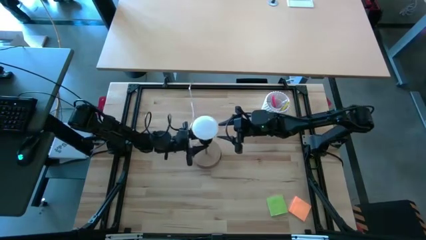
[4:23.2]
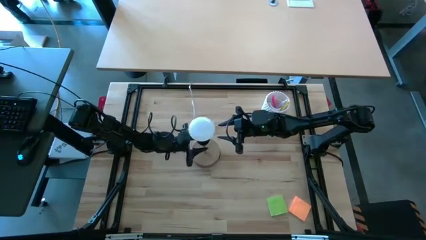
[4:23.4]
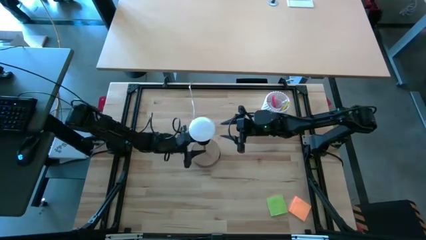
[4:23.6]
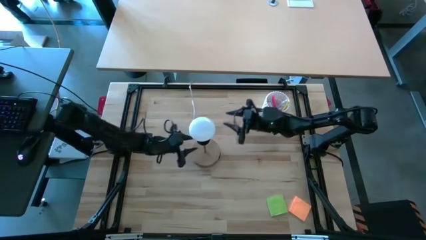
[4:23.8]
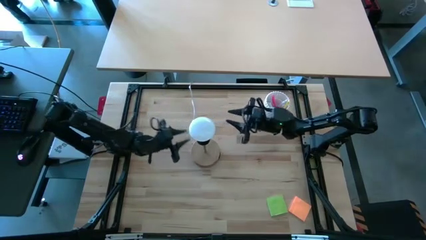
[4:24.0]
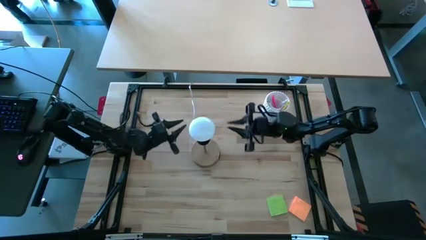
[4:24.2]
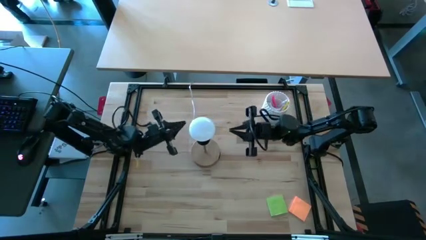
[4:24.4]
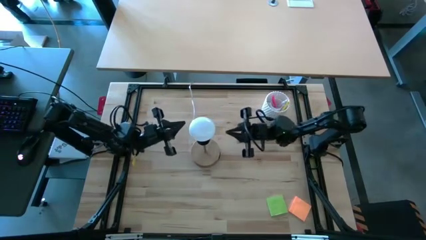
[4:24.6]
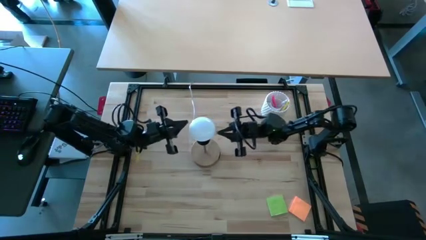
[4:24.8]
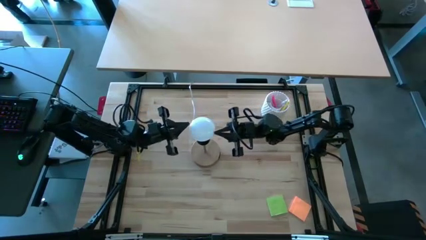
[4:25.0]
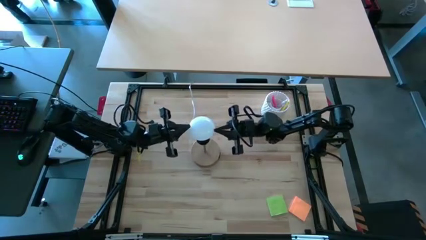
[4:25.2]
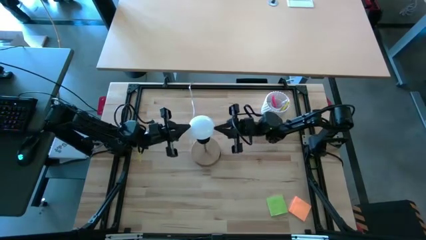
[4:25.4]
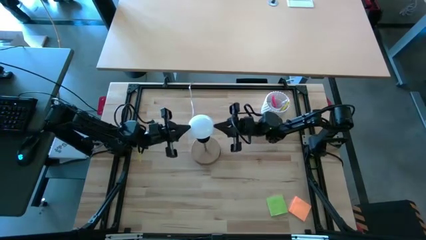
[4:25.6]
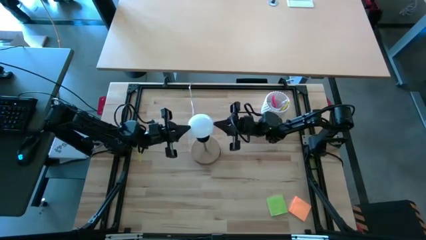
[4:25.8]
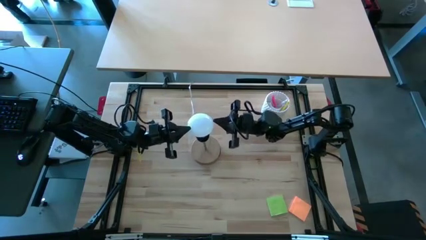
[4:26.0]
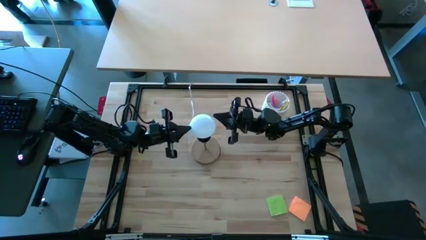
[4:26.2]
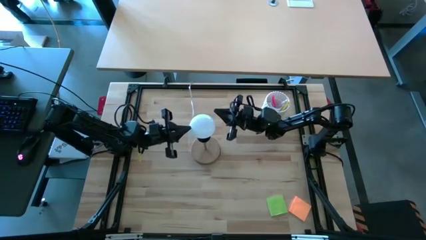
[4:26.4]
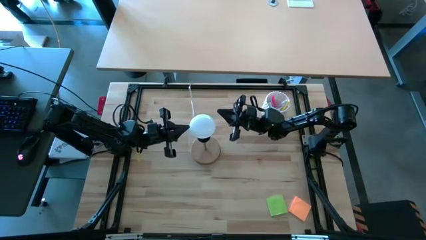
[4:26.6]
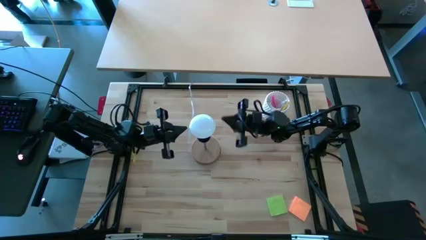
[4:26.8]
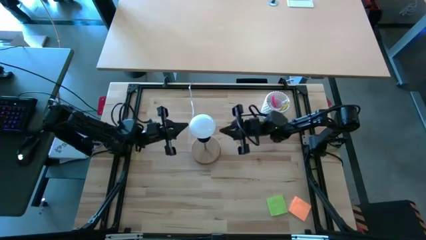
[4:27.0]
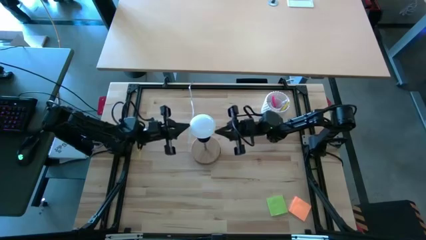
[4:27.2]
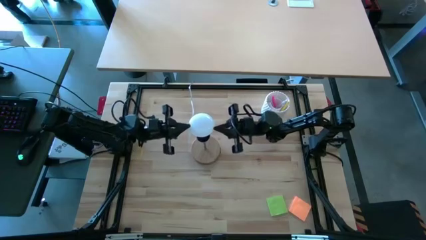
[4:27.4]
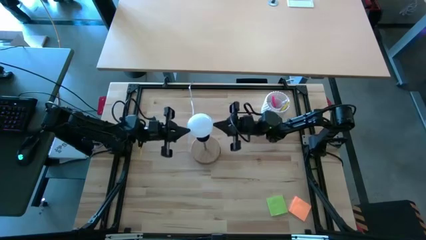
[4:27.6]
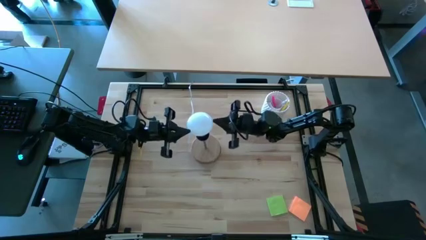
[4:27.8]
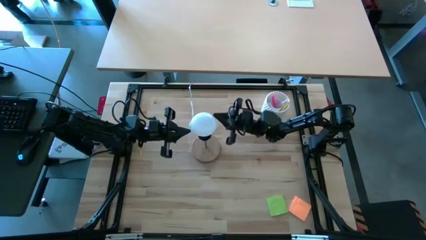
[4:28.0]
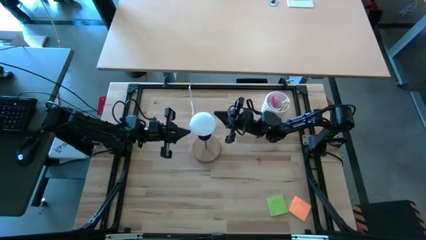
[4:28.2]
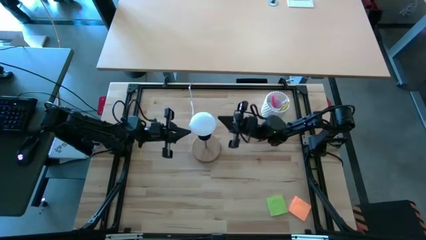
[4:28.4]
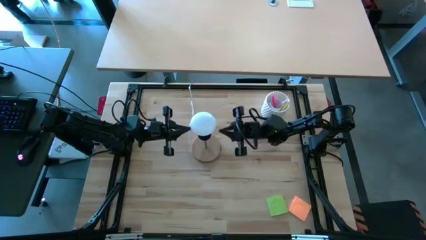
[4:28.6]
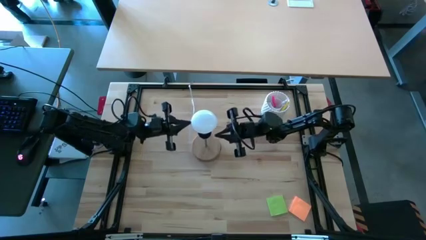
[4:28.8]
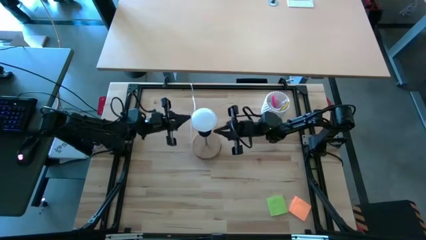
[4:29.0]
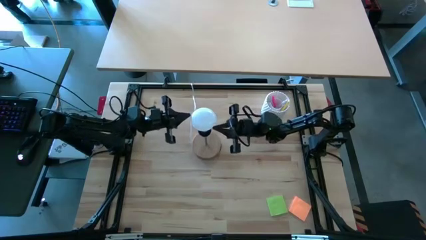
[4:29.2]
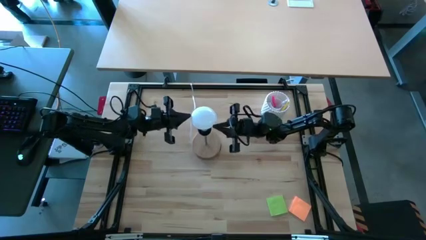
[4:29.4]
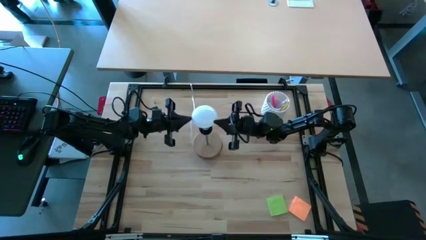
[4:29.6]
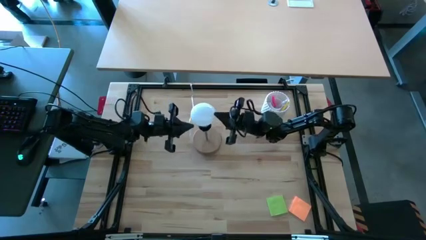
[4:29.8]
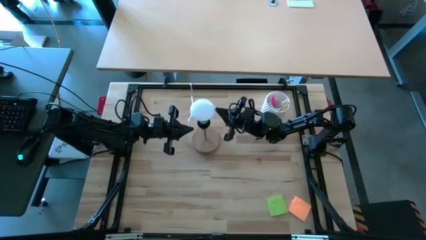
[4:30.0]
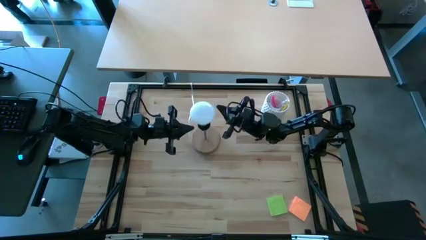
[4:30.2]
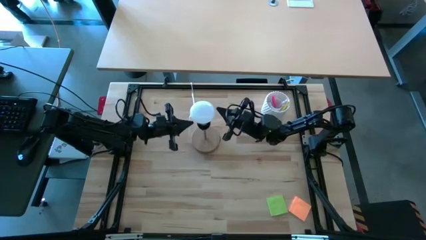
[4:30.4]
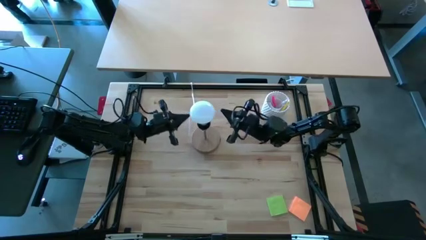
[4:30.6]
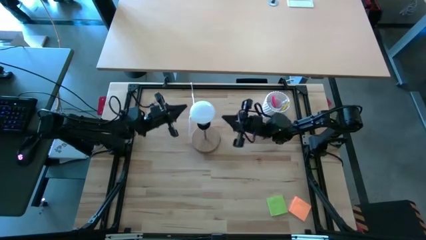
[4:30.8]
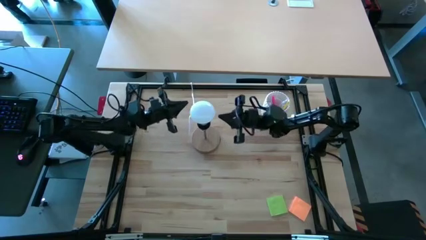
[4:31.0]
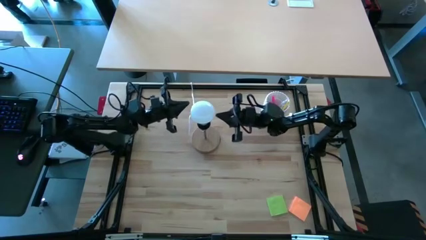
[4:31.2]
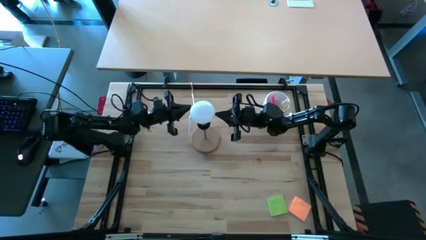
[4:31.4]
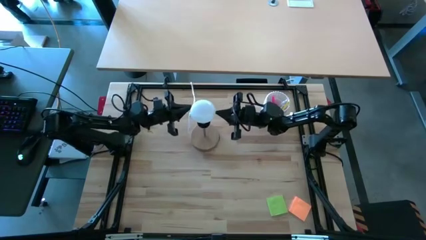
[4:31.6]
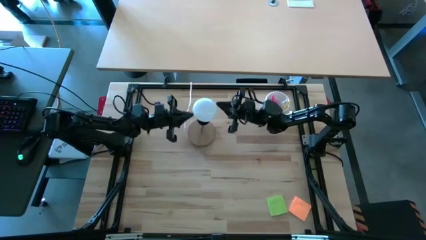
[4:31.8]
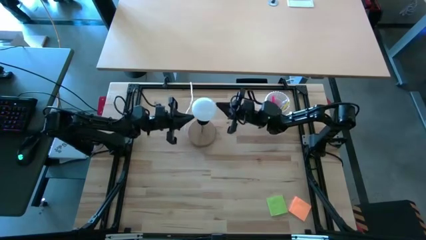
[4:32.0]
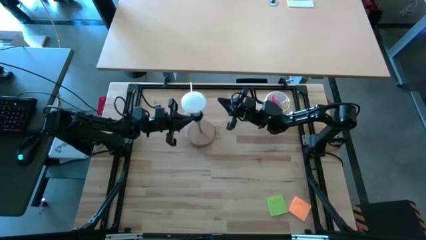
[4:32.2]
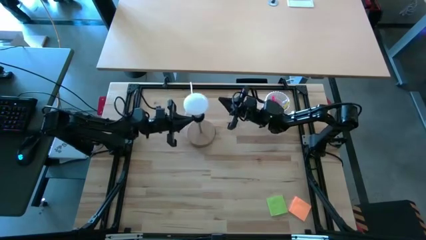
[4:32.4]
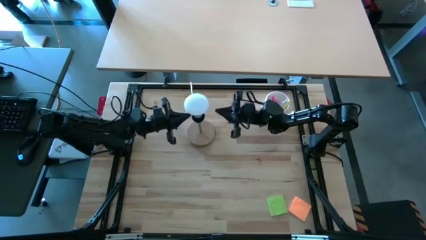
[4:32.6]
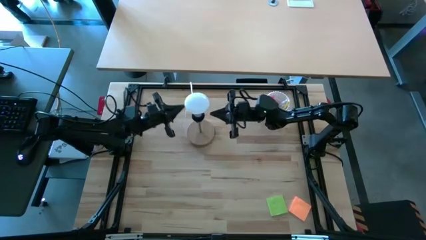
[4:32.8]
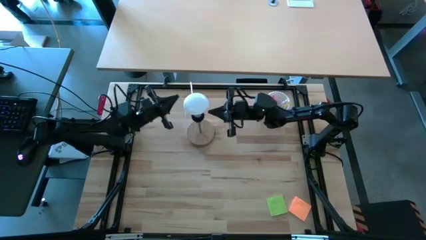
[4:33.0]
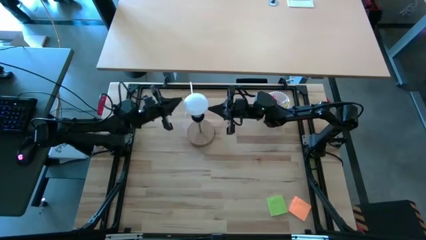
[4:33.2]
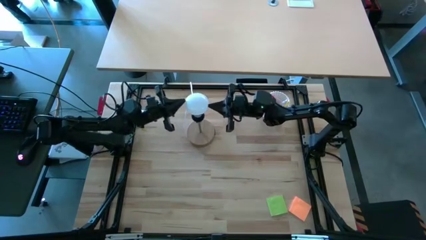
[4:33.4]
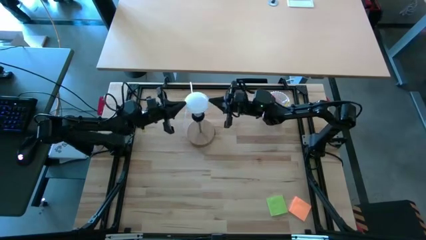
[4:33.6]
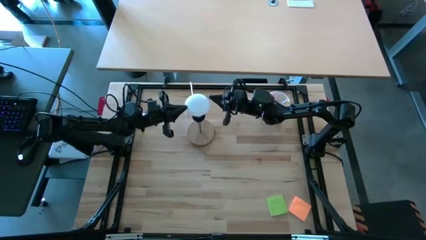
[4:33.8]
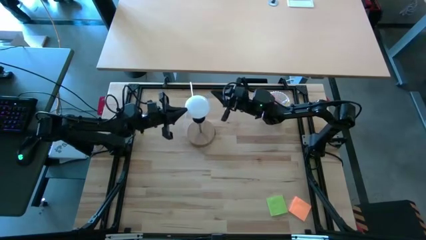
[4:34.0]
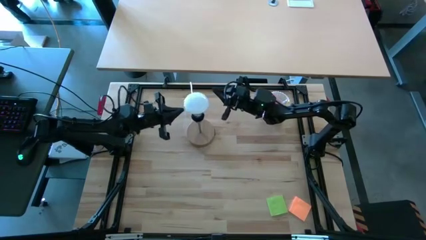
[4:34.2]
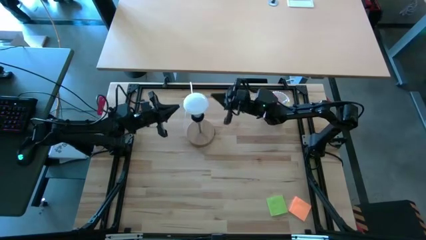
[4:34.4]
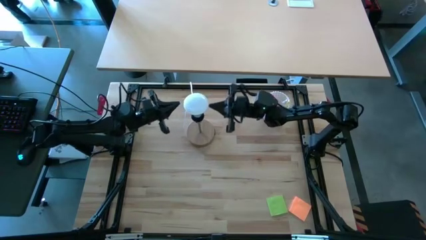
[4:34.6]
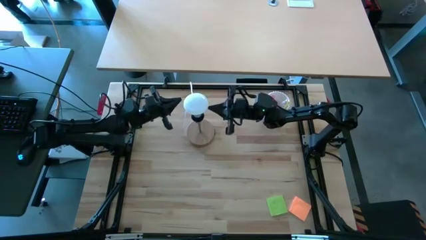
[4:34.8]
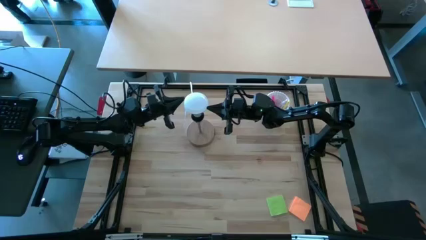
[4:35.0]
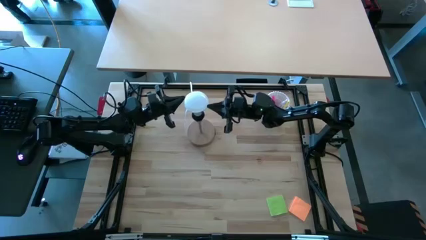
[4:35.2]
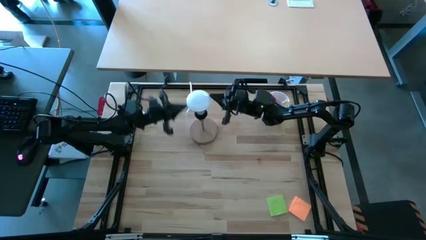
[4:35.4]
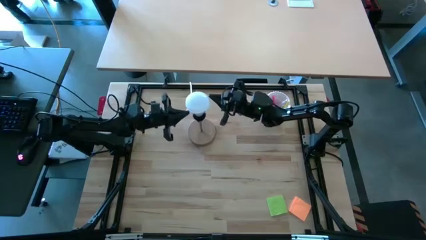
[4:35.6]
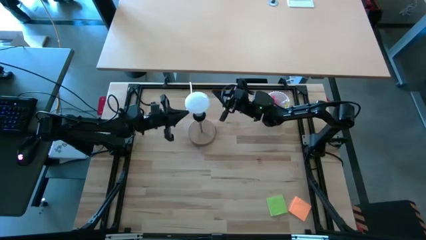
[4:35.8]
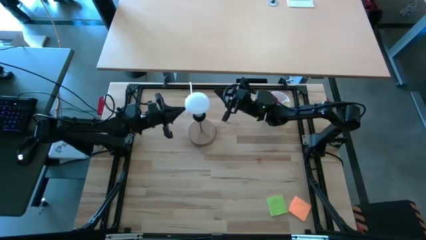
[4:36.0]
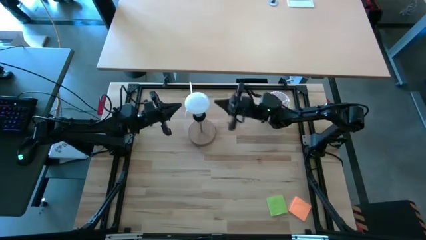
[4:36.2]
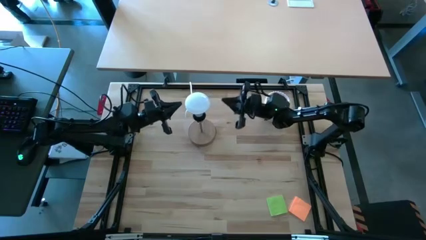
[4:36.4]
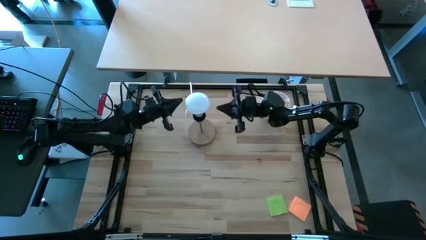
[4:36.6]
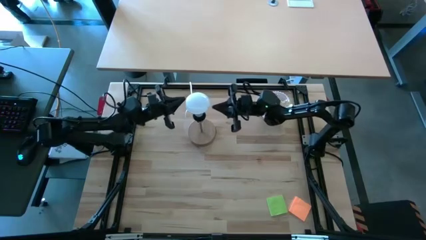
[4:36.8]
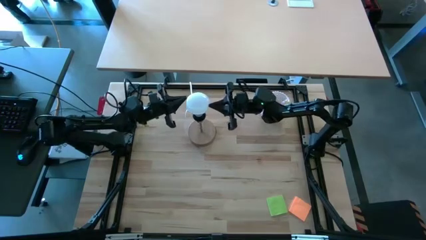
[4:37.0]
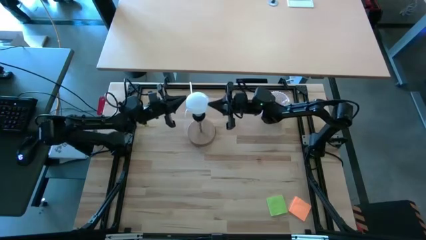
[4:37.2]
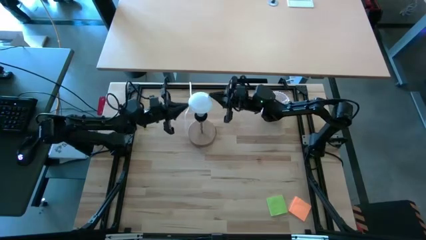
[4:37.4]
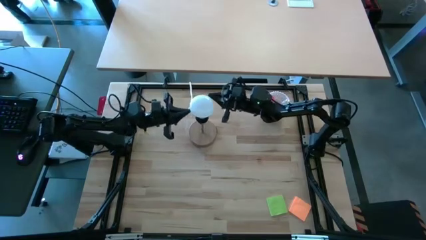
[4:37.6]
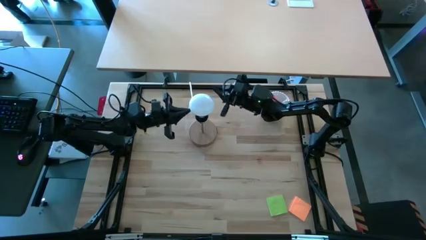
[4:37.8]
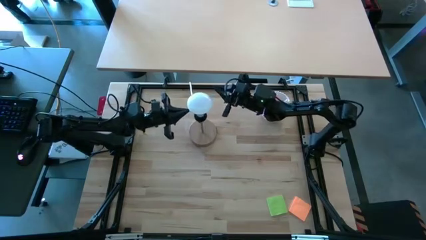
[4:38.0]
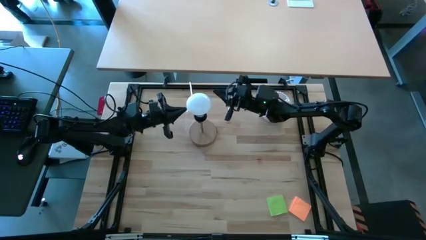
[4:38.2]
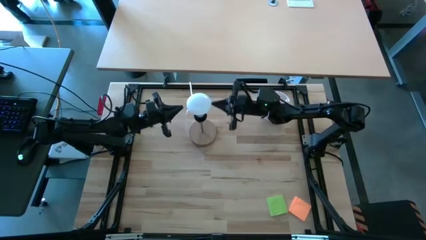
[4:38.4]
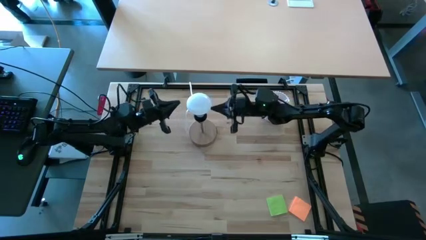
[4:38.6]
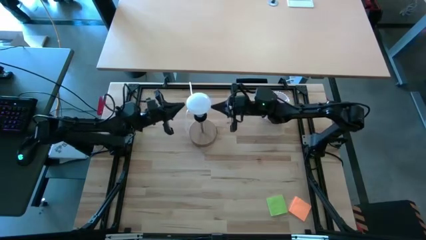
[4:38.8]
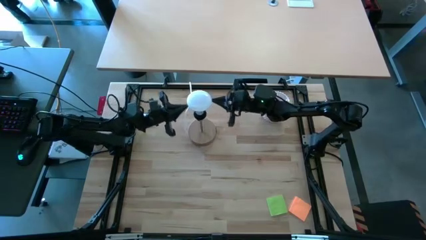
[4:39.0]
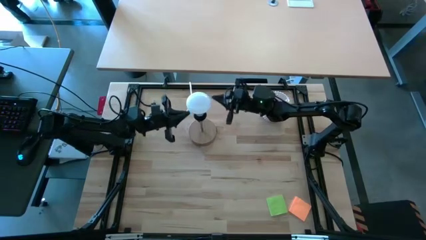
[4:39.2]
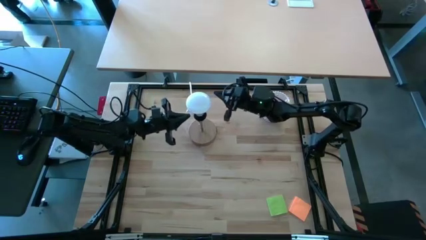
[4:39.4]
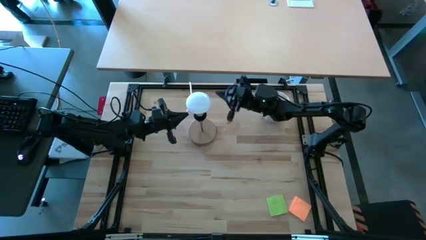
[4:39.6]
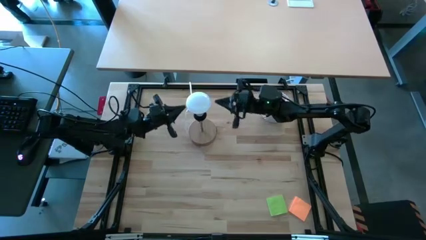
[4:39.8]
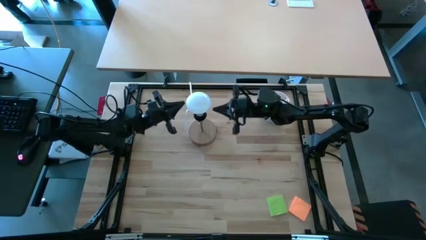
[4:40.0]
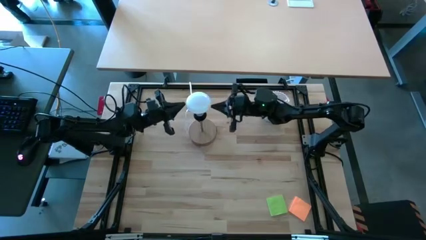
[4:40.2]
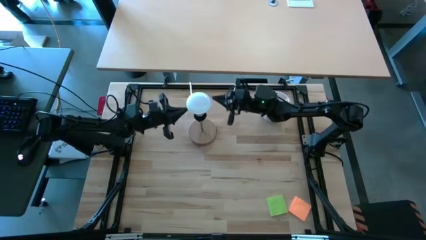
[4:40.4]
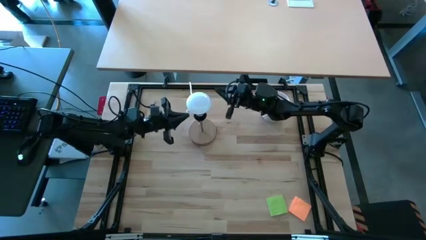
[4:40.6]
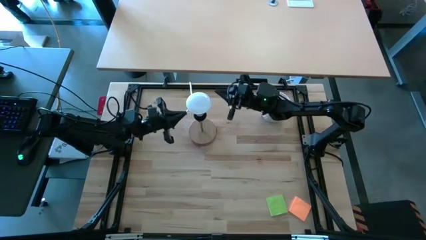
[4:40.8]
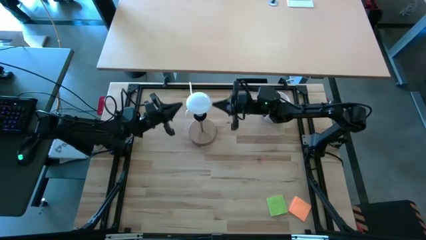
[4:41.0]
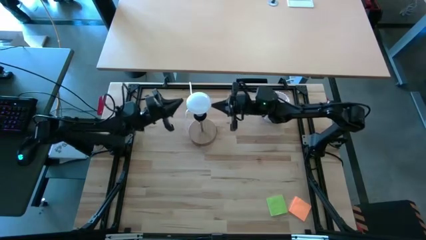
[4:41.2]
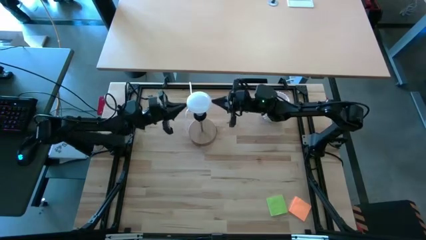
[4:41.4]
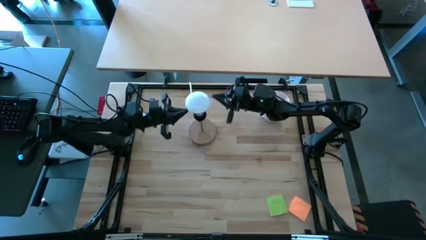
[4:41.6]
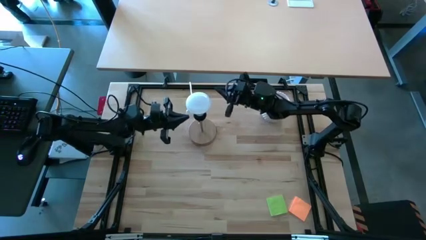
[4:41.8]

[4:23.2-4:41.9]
Task: Screw lightbulb
Remove the lightbulb from the lamp
